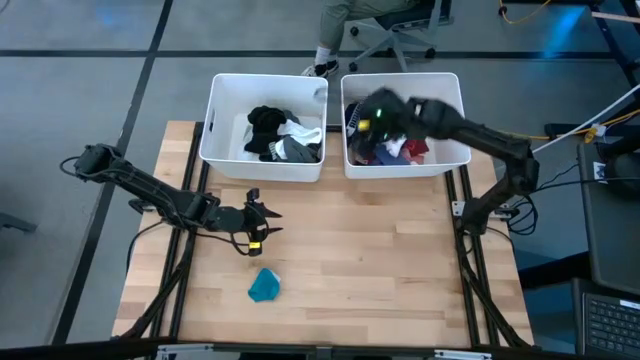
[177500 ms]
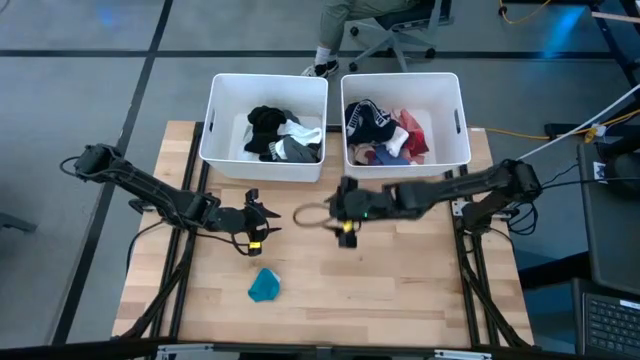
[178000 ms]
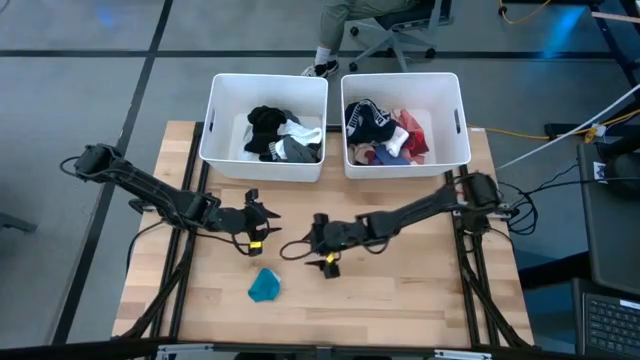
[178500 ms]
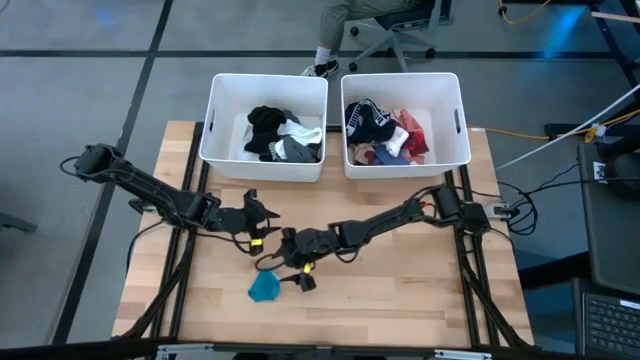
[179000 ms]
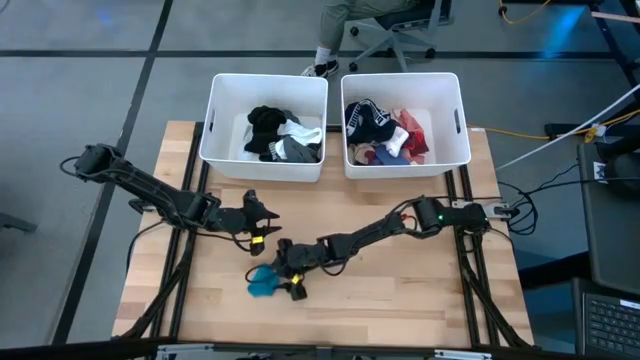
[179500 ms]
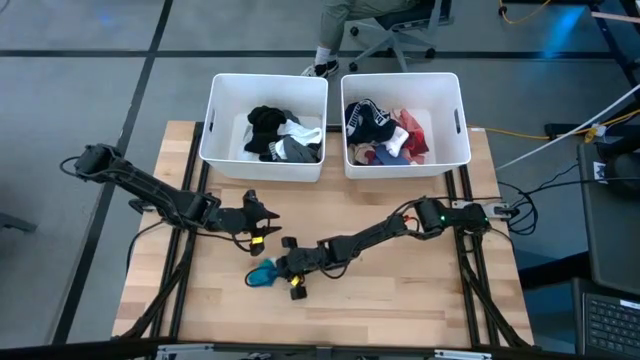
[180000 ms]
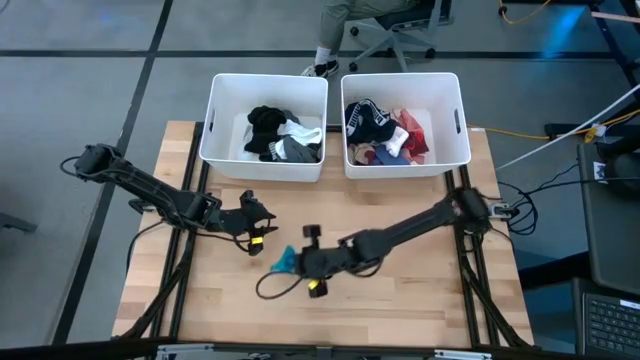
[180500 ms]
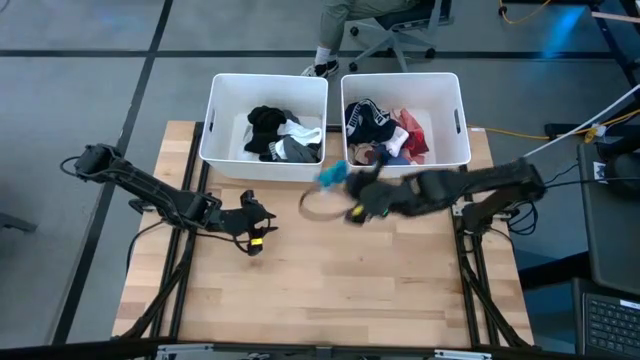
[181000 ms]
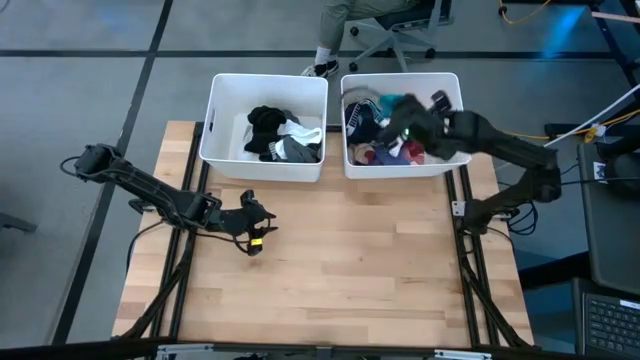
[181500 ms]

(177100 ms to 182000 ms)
Task: Sort clothes
Put the blue sock into the laundry bin

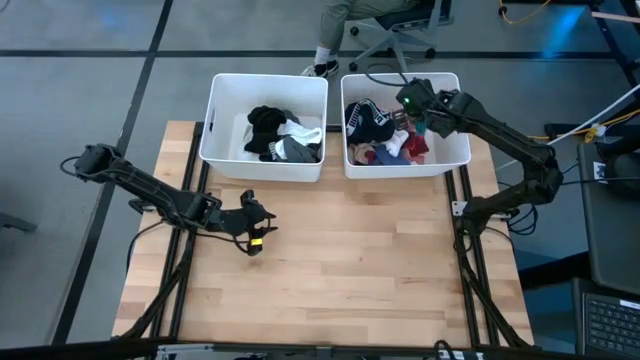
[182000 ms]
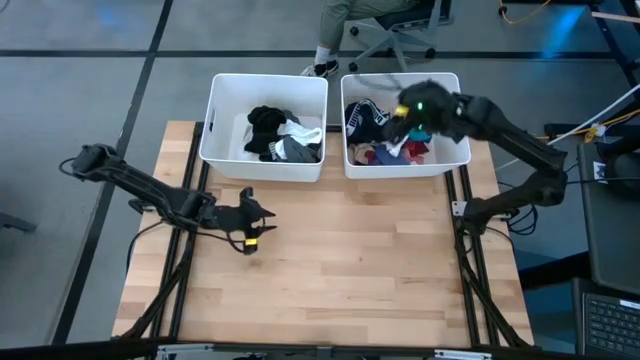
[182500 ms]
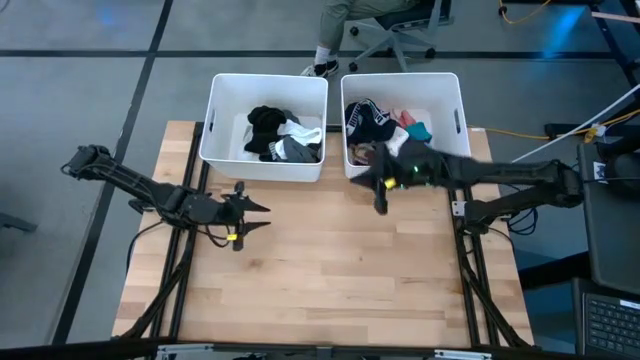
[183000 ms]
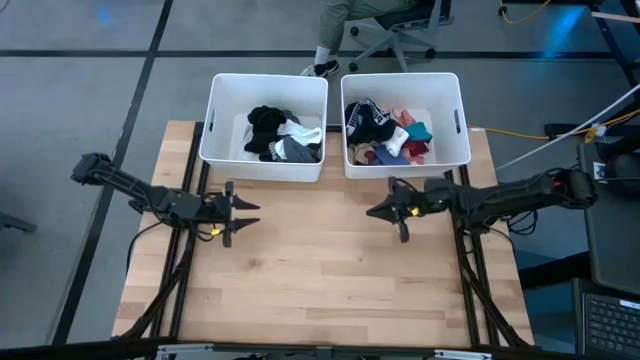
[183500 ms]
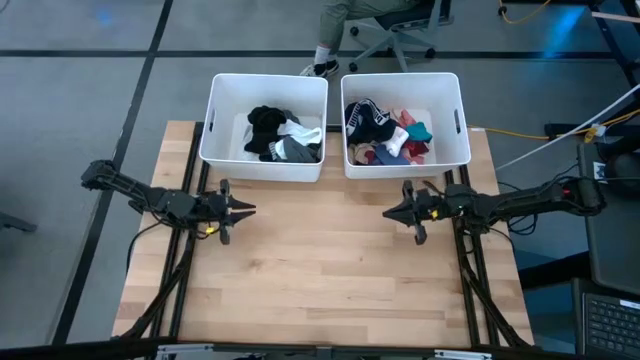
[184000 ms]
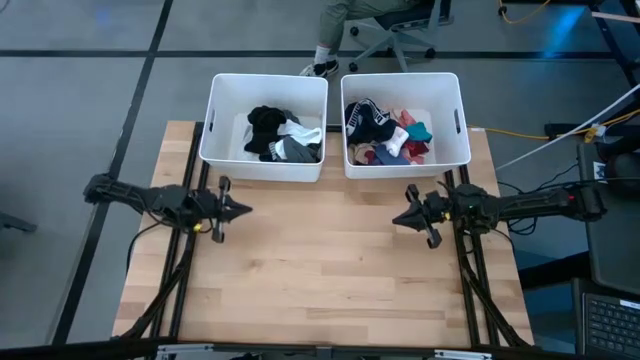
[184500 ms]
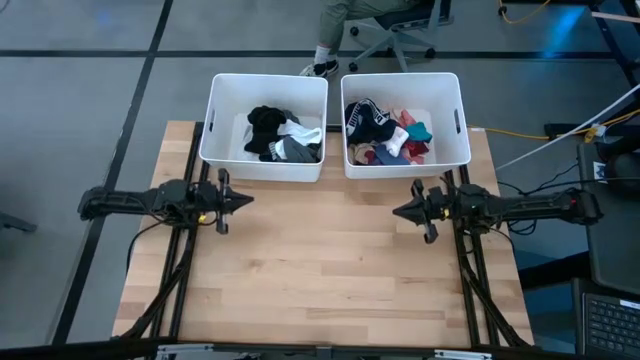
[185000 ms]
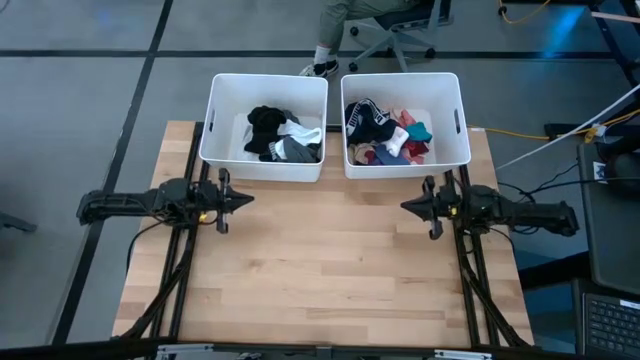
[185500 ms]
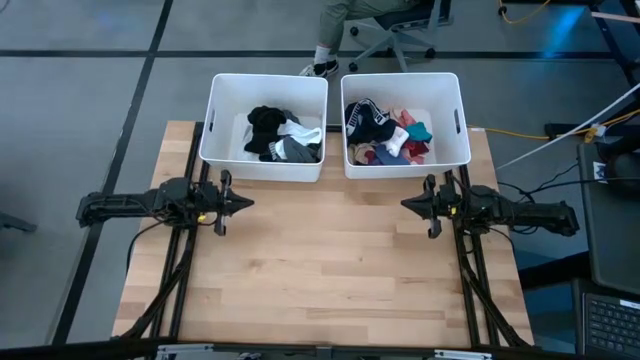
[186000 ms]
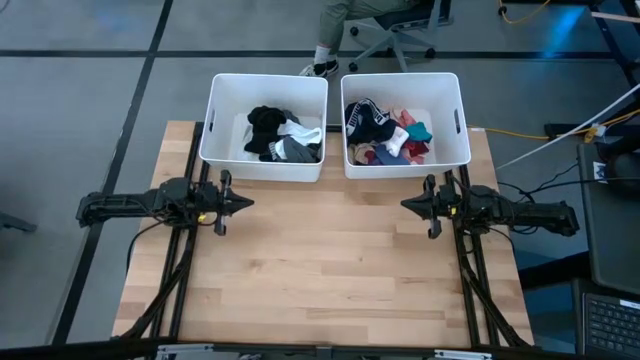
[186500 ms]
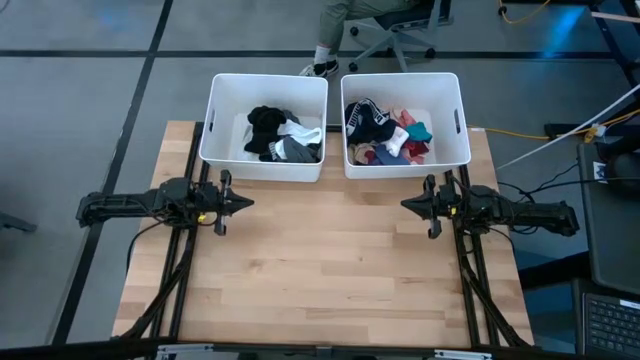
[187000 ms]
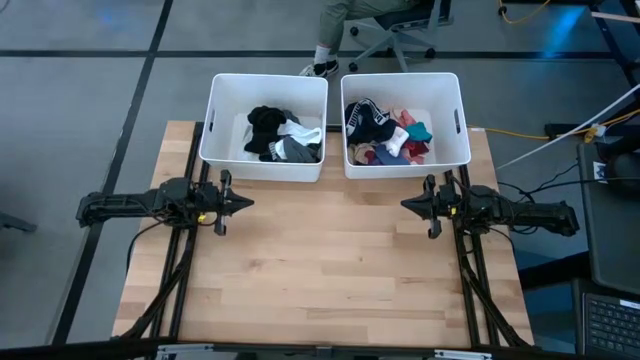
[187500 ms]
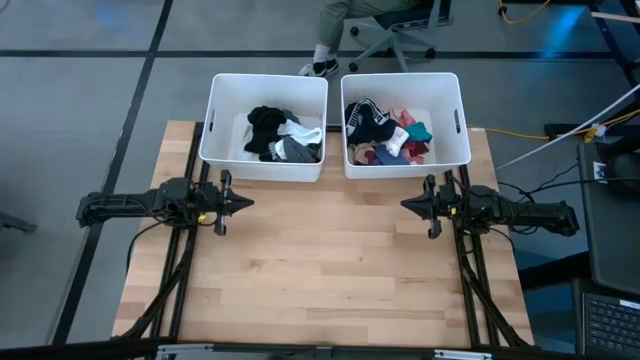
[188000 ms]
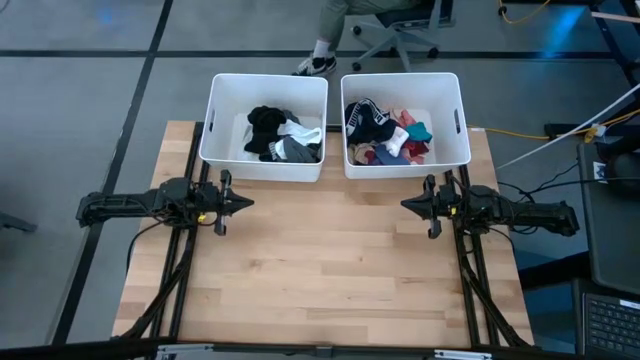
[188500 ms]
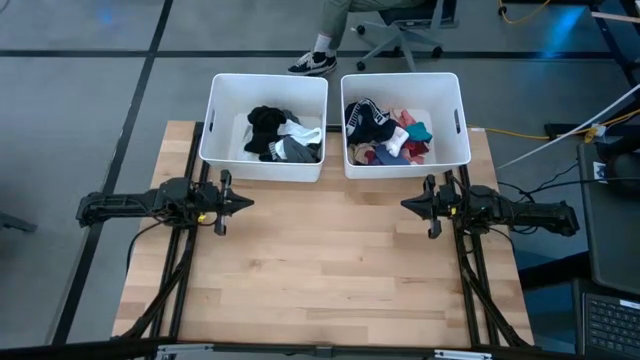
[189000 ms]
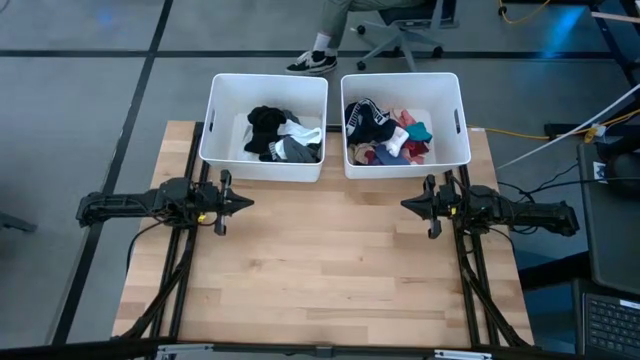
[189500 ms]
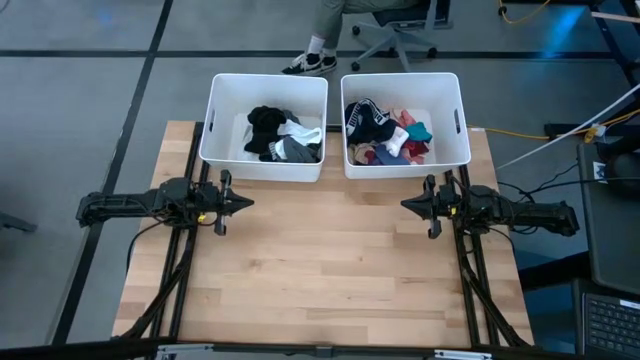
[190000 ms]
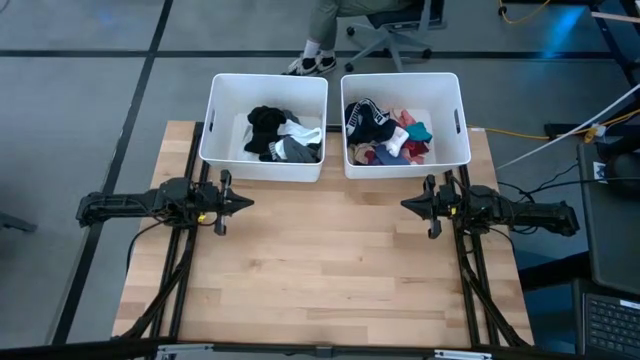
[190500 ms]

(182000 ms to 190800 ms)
Return to Home Position

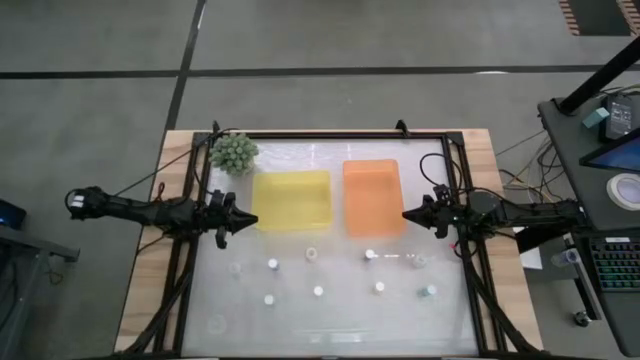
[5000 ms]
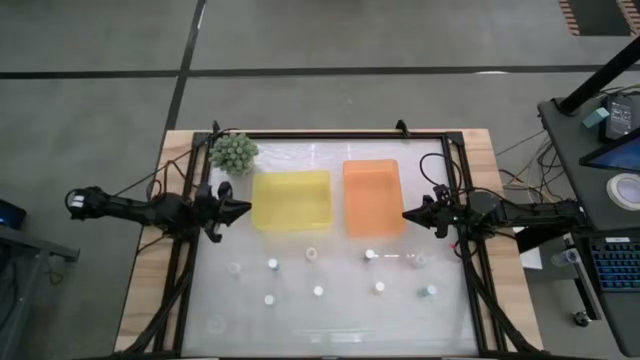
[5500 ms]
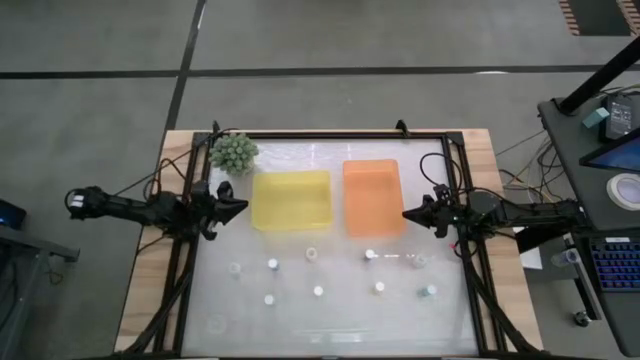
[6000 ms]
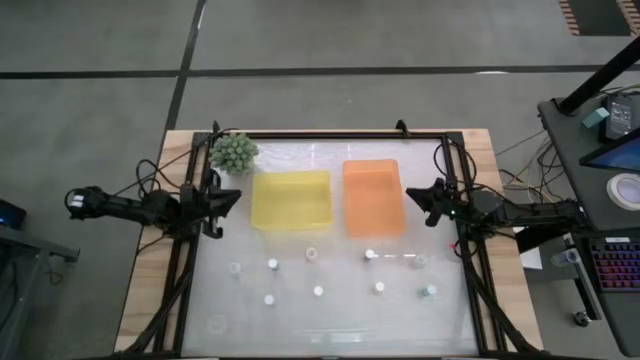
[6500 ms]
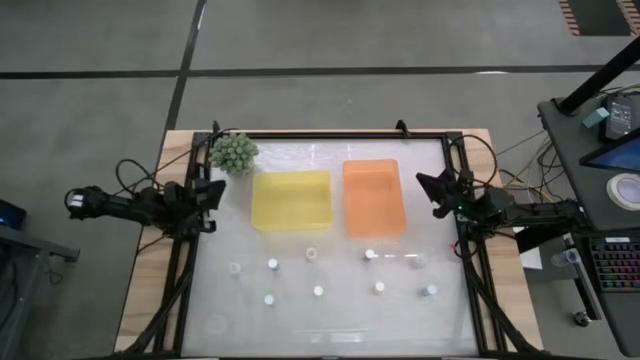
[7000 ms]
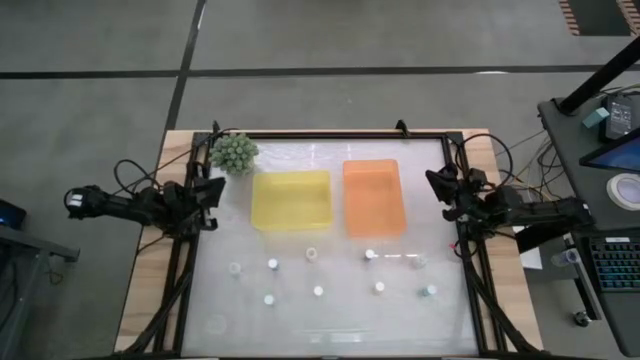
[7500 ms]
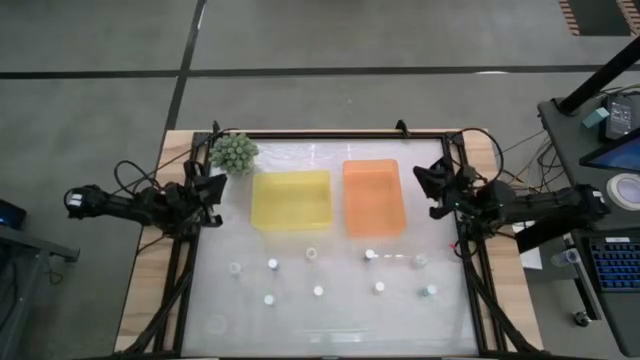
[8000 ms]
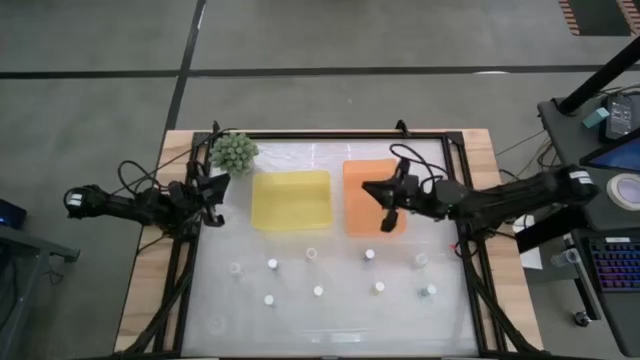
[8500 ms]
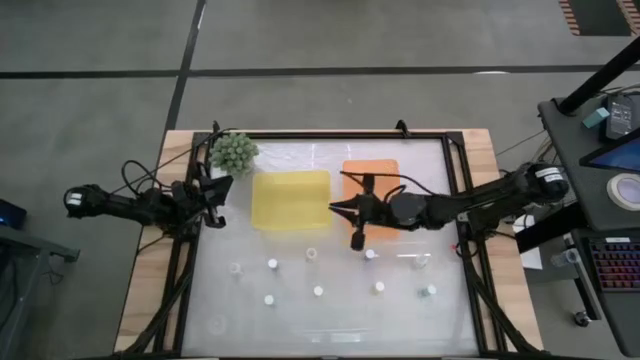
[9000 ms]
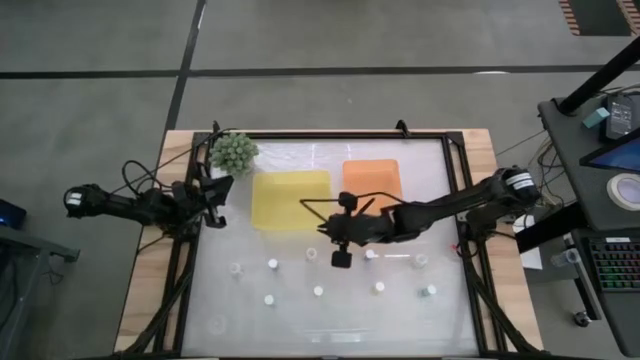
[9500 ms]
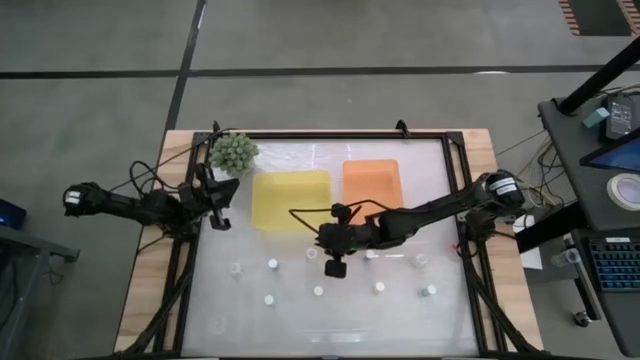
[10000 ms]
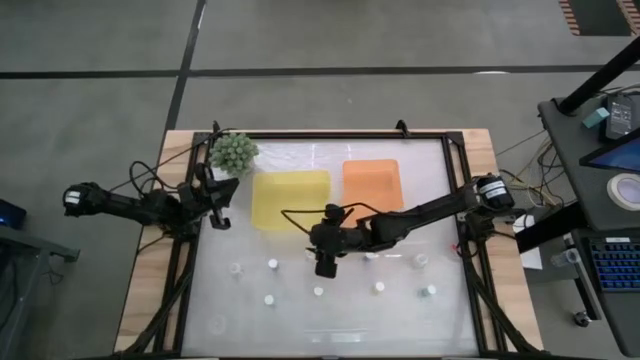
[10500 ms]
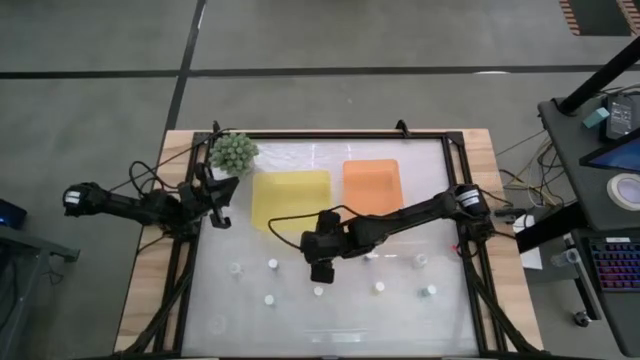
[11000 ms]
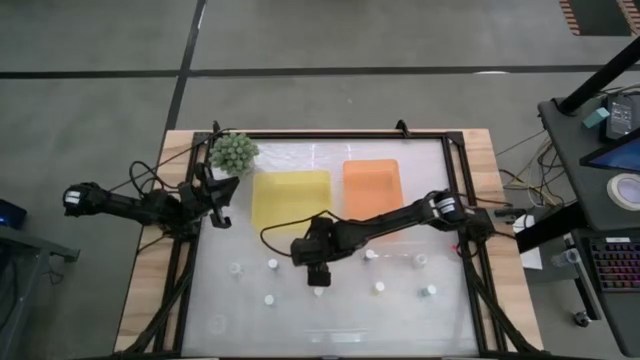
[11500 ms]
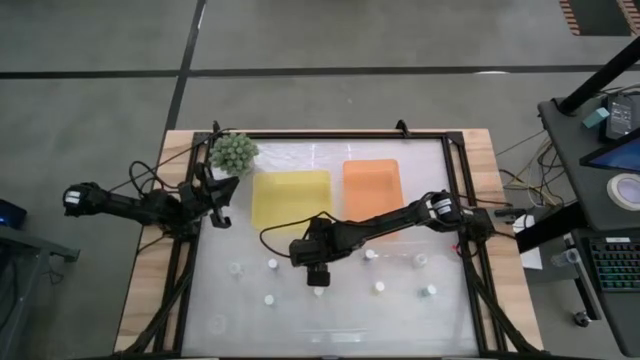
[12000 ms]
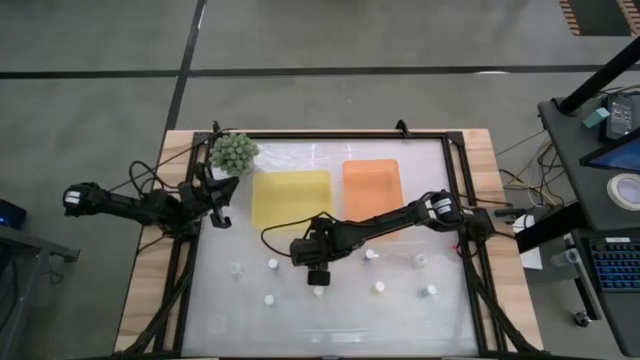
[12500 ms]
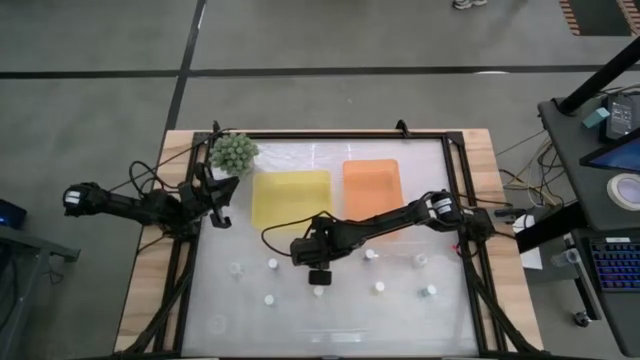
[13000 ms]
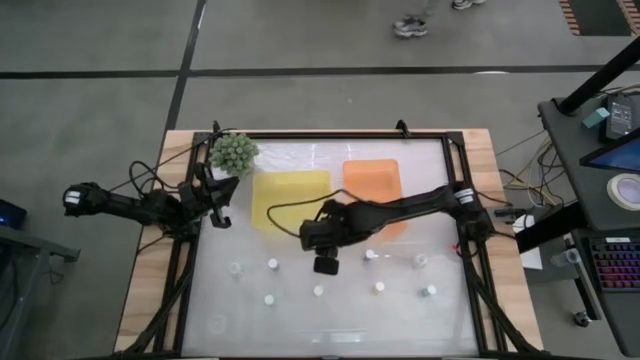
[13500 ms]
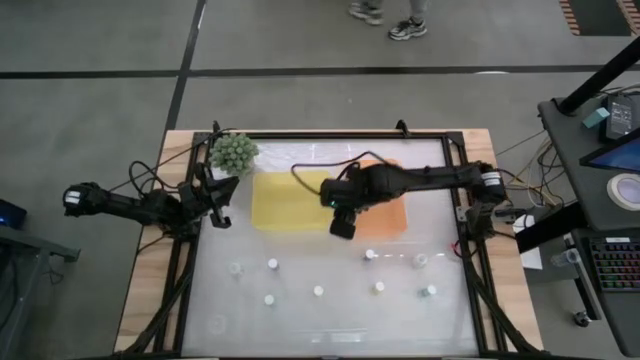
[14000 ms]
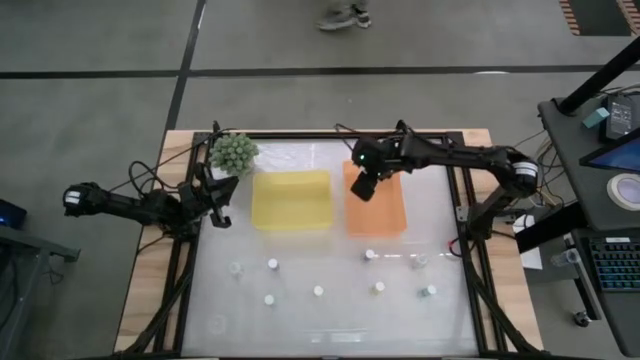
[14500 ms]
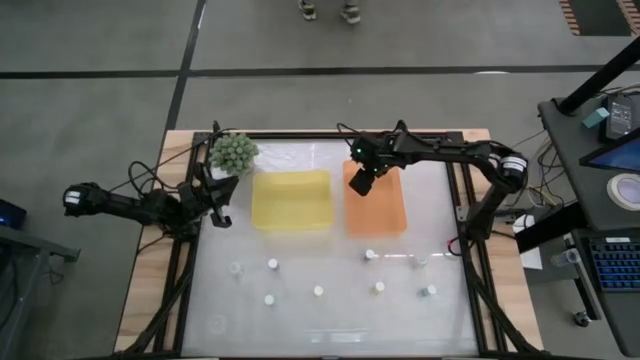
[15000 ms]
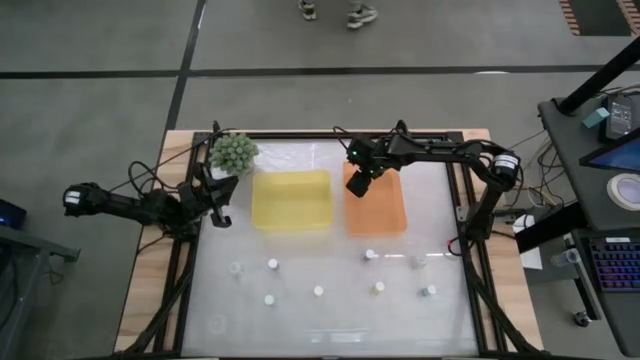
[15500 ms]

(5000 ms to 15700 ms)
Task: Pick and place medicine bottles into bin by pill shape (circle, oval)
Put the top transparent pill bottle into the orange bin
